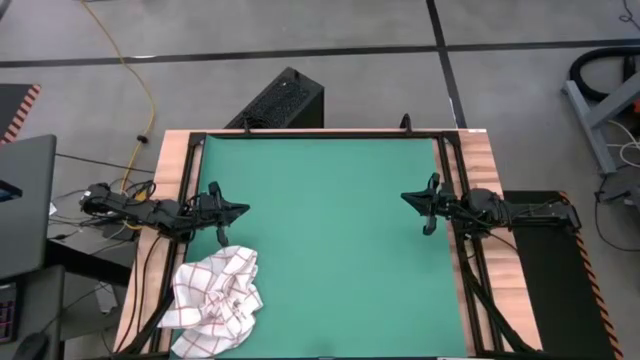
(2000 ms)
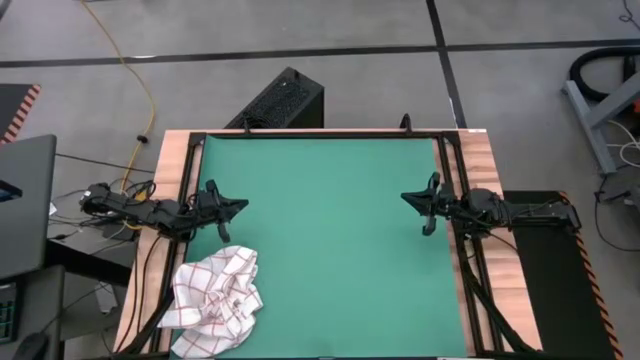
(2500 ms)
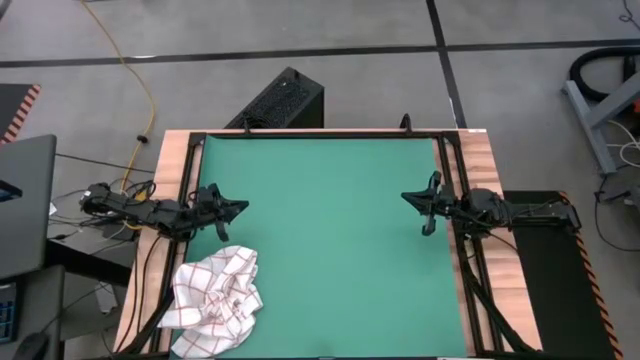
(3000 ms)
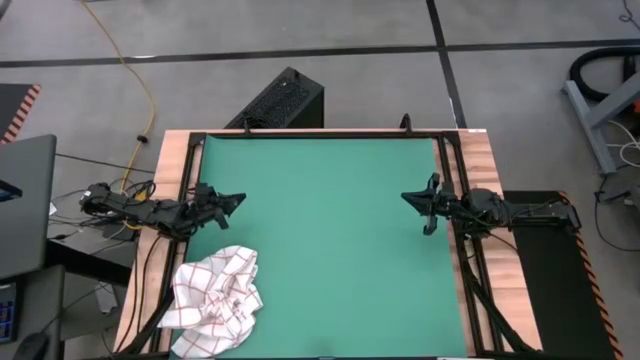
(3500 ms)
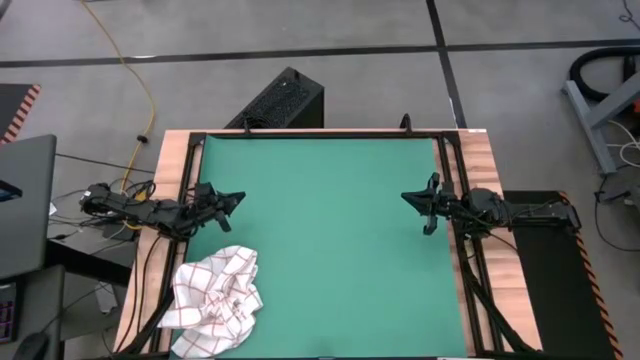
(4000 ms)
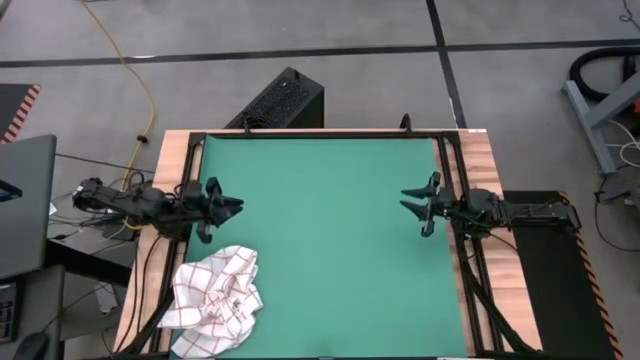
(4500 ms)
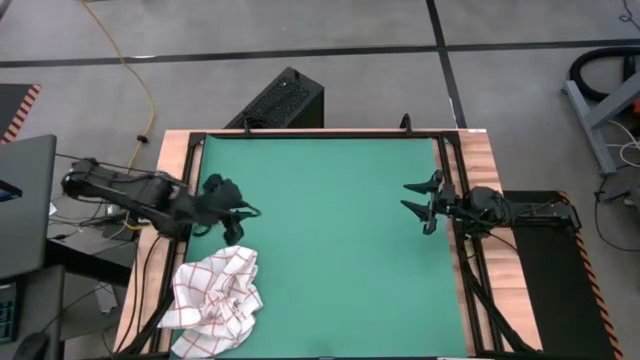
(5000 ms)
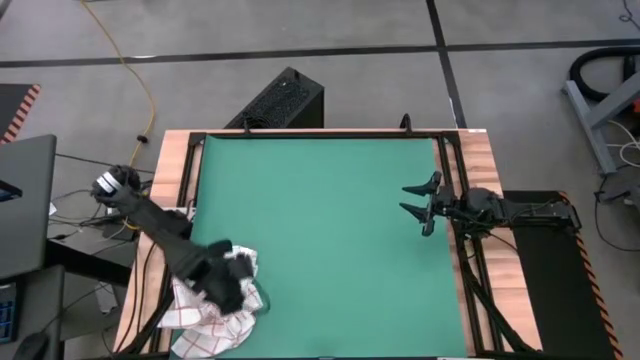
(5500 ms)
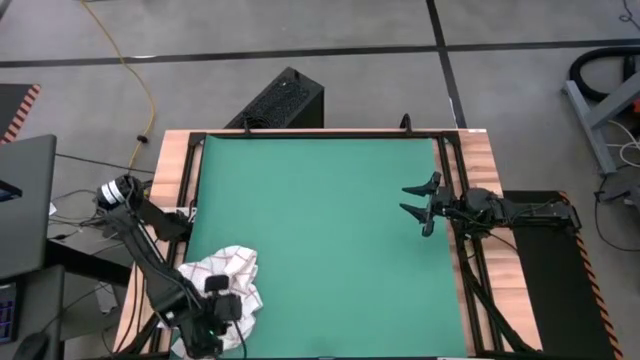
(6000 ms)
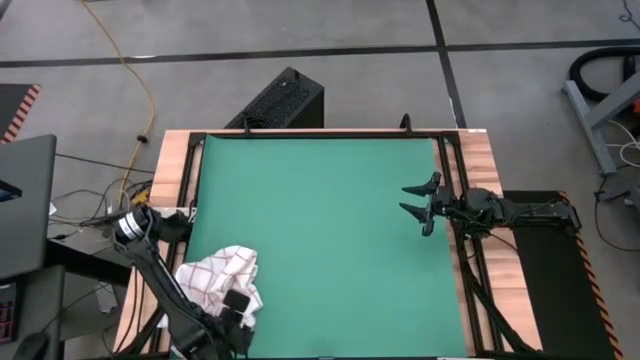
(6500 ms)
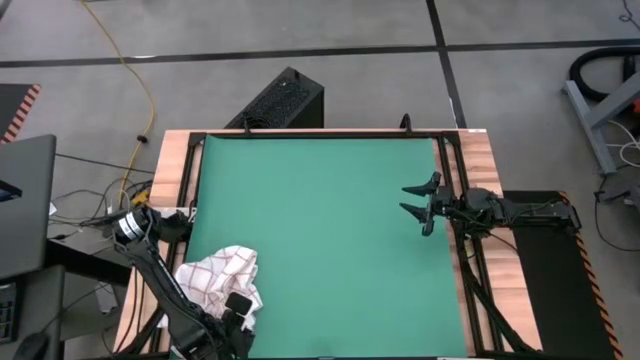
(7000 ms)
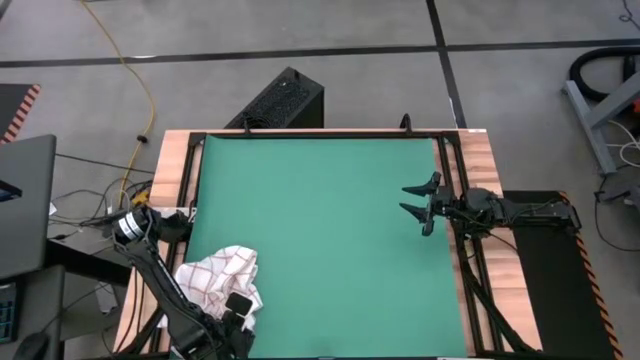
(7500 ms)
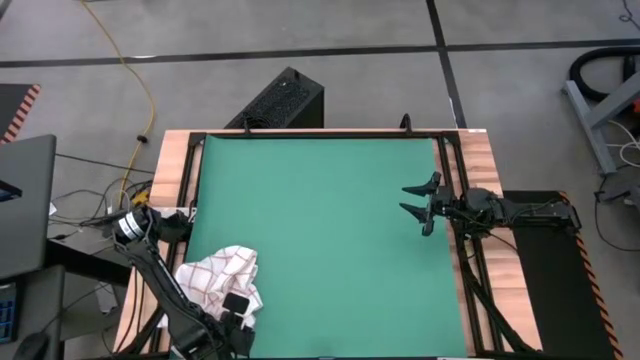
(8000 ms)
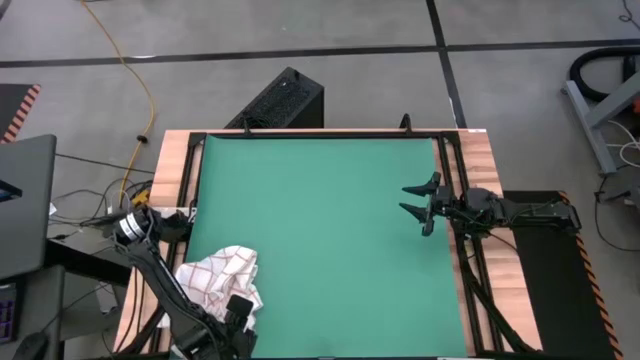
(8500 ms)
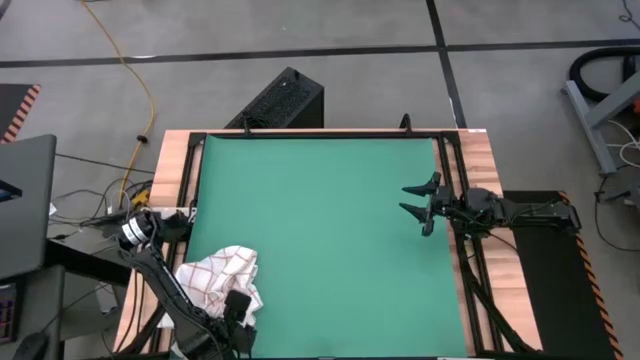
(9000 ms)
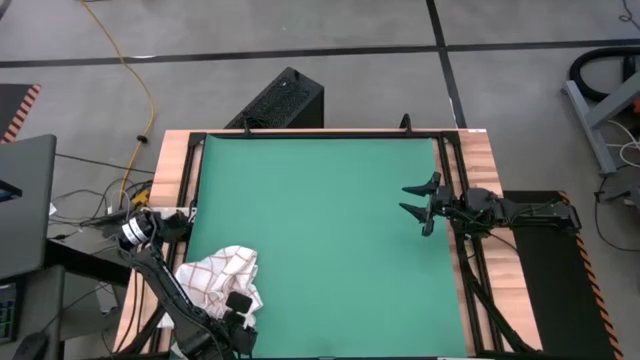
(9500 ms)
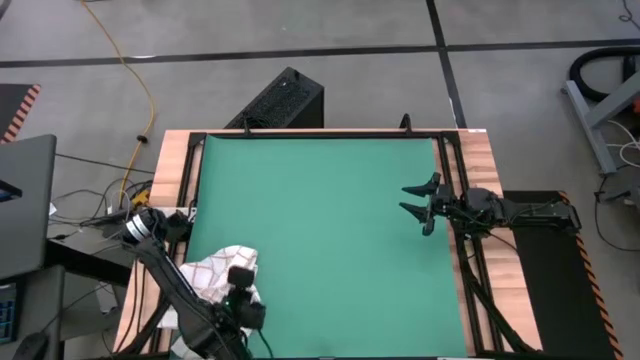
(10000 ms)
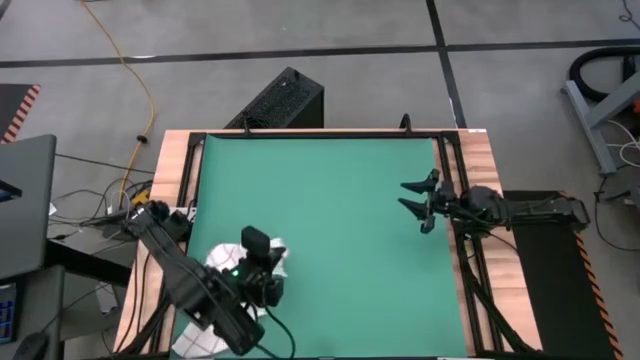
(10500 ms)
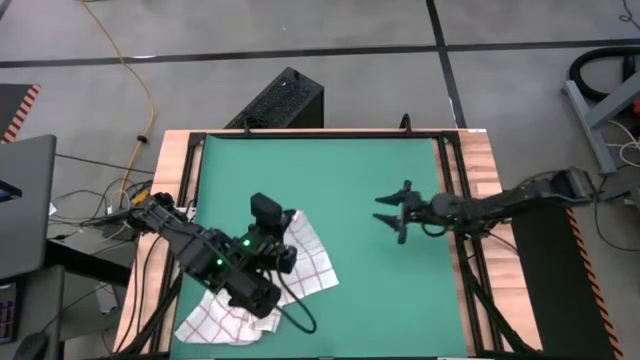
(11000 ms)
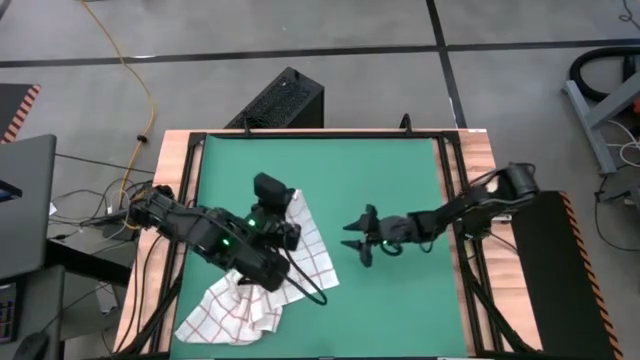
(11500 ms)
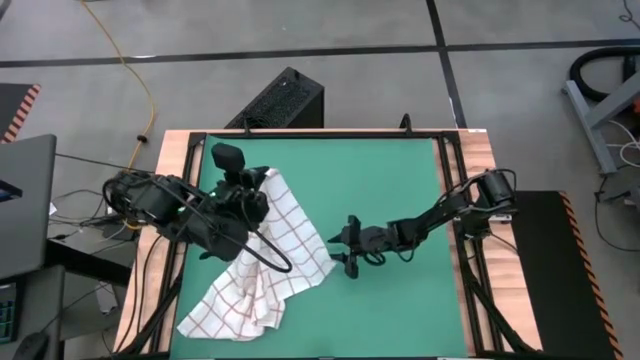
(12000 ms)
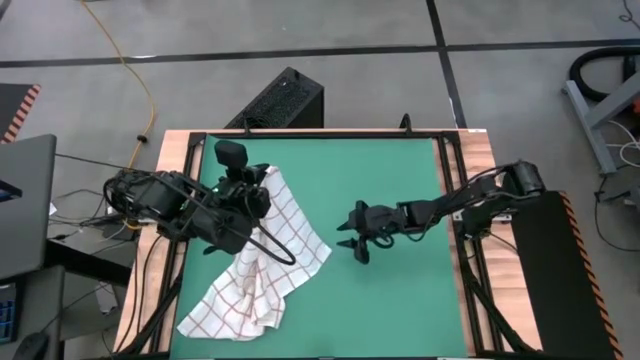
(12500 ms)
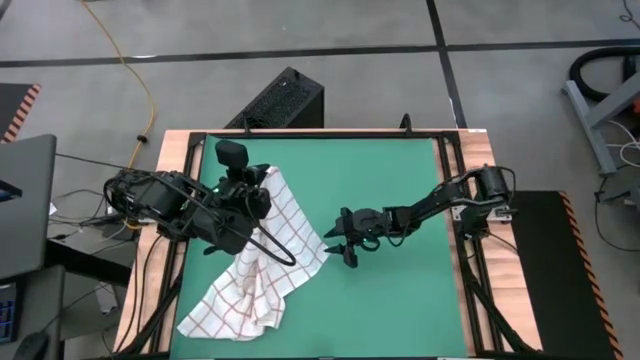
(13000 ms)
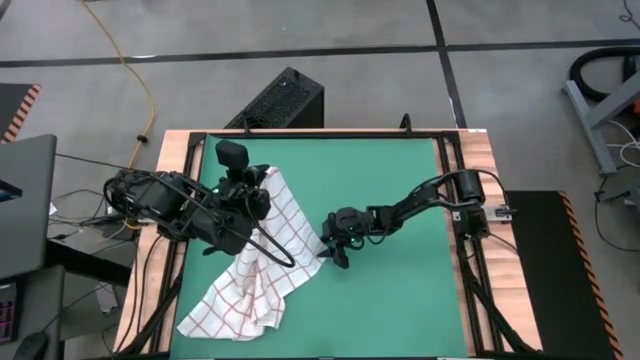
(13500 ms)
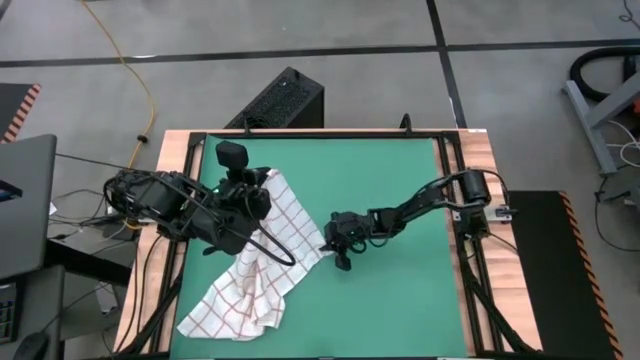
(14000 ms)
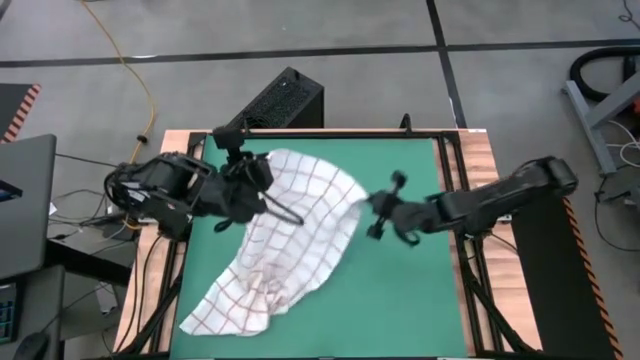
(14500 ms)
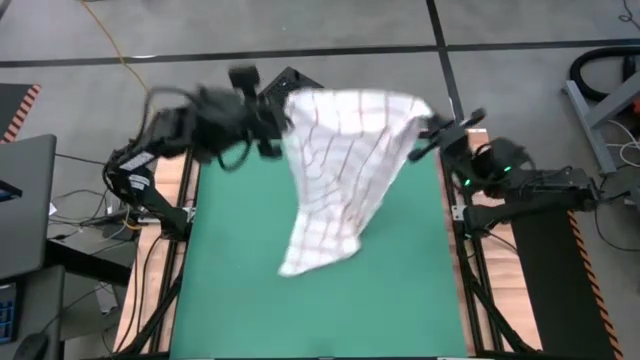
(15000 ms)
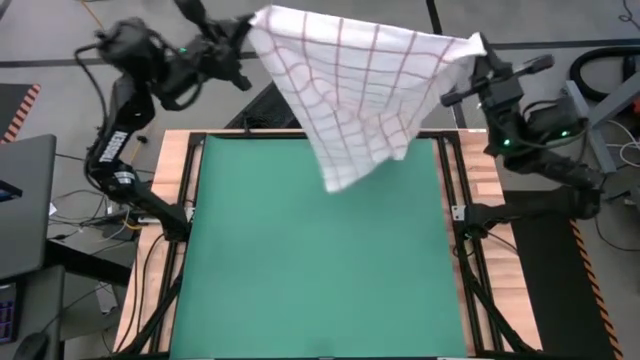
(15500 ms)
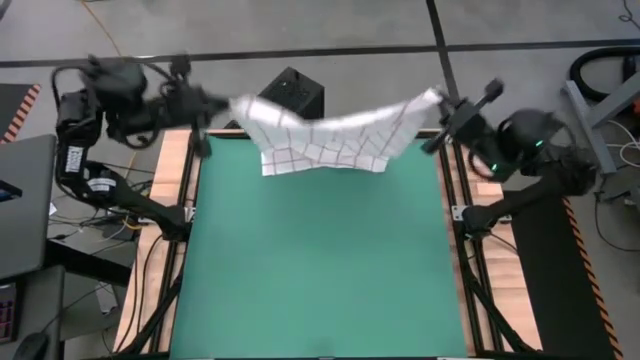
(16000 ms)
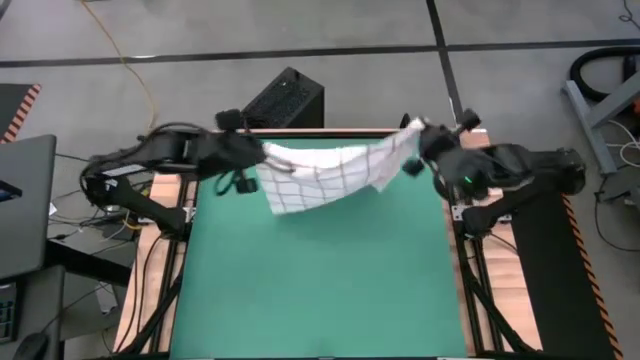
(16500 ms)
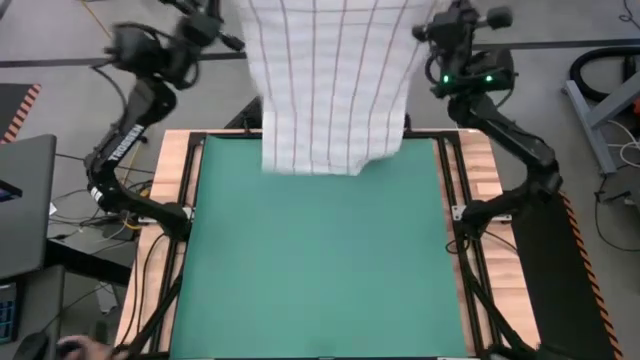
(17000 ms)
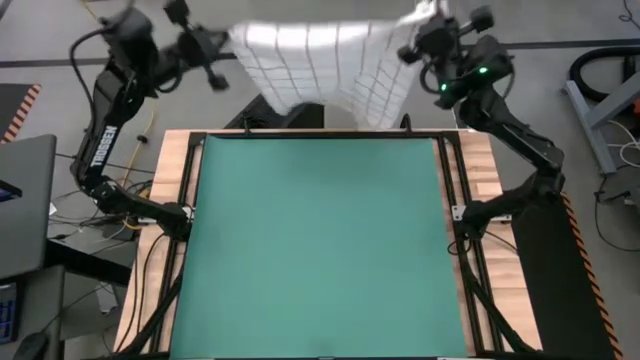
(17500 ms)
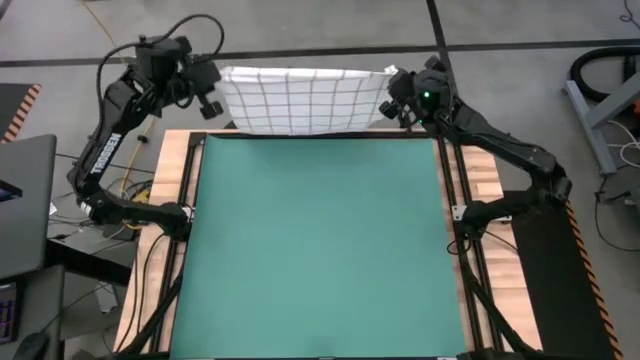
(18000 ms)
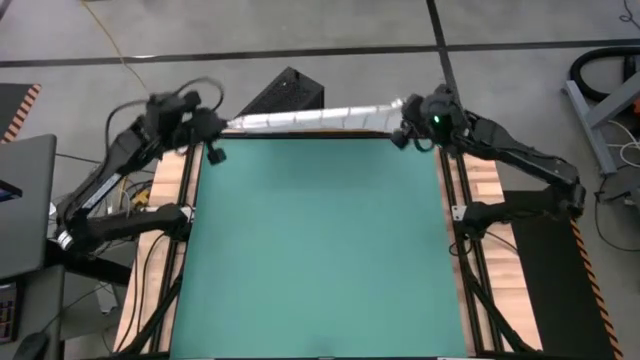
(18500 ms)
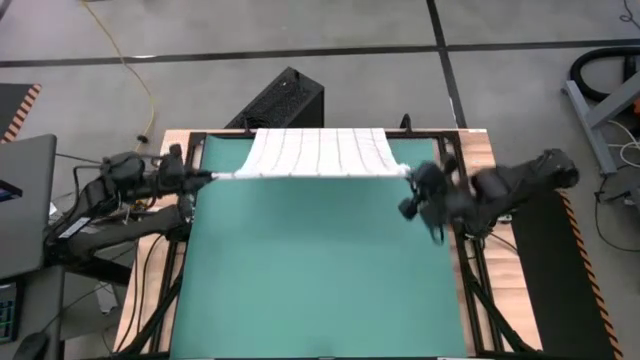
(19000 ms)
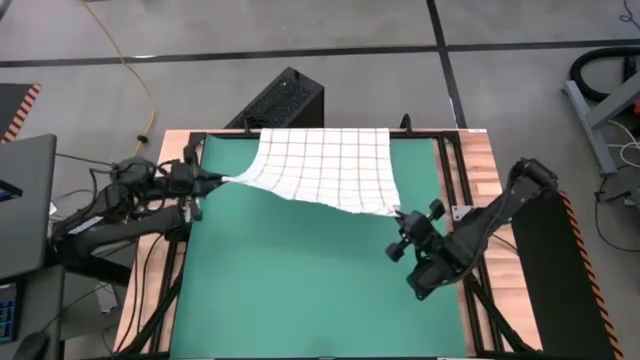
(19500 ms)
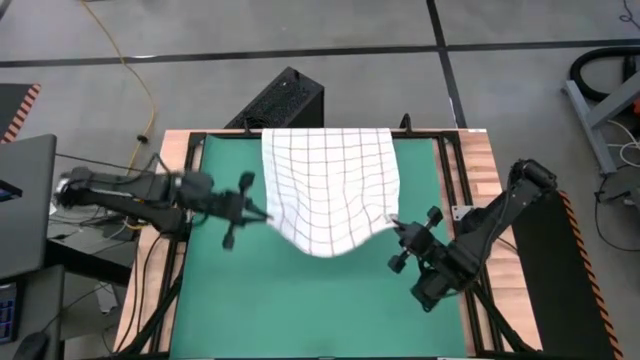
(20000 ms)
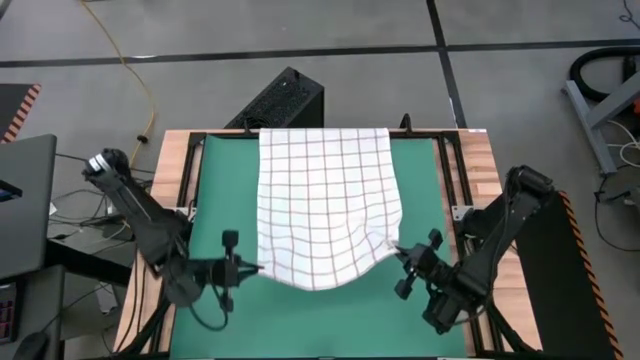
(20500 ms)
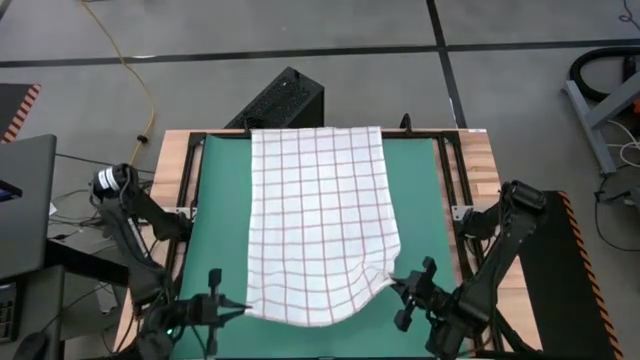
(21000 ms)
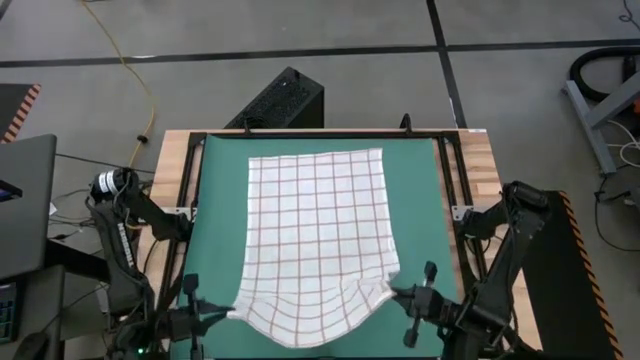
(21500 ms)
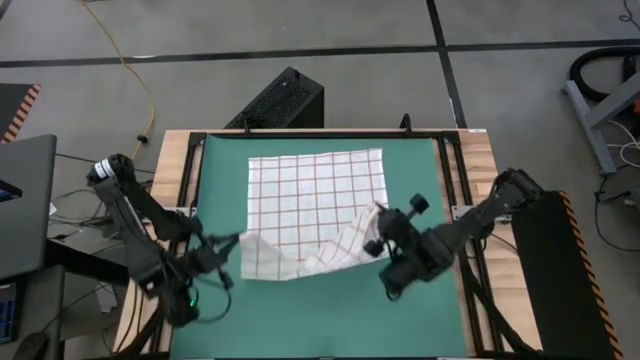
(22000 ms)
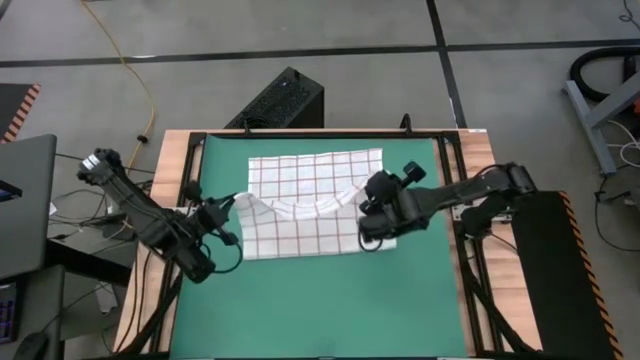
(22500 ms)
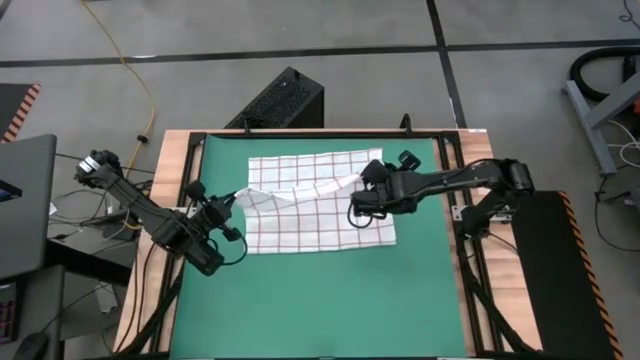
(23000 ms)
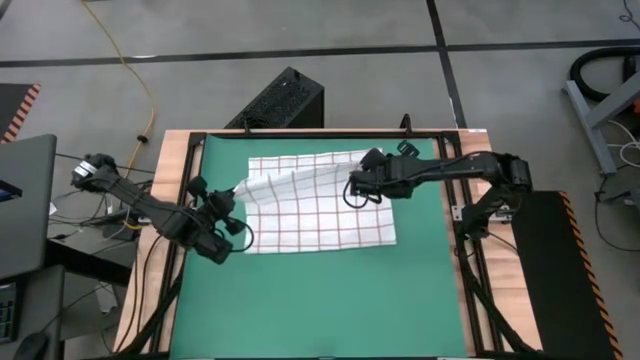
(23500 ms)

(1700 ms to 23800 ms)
Task: Roll towel into tight, uniform cylinder
Fold the white towel
